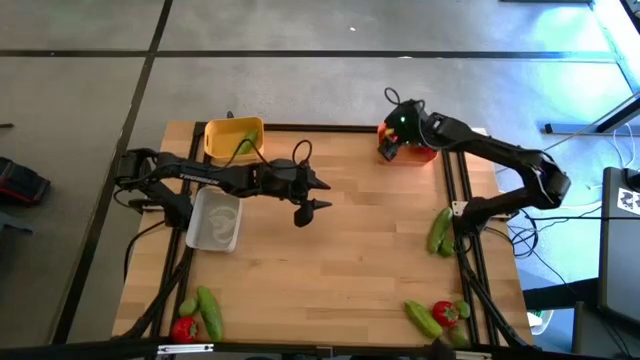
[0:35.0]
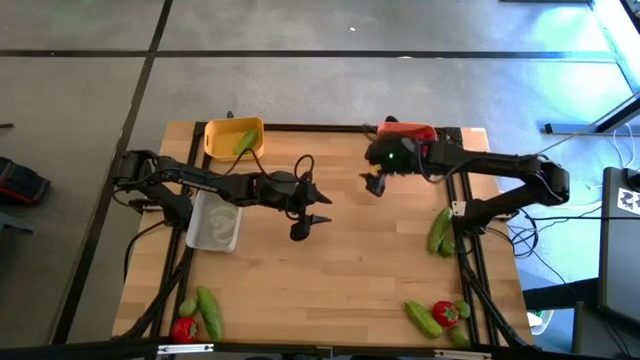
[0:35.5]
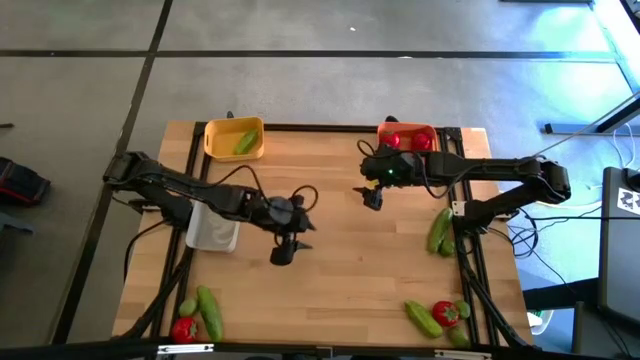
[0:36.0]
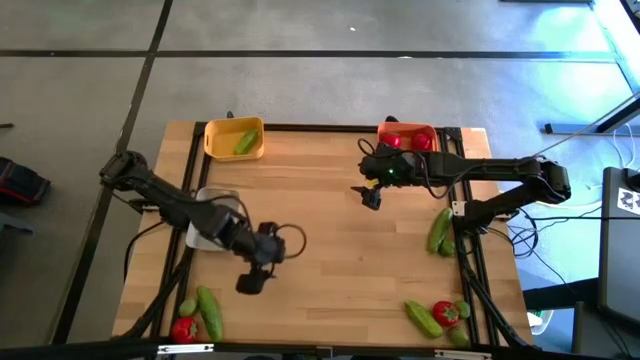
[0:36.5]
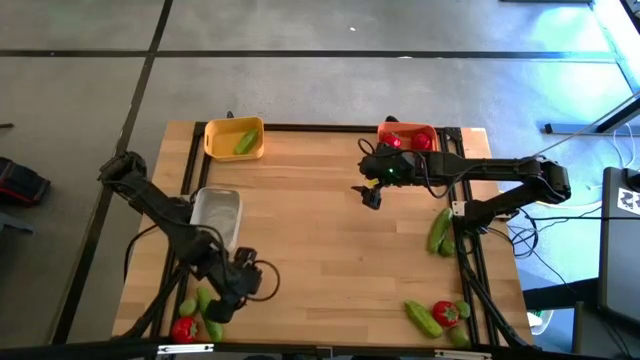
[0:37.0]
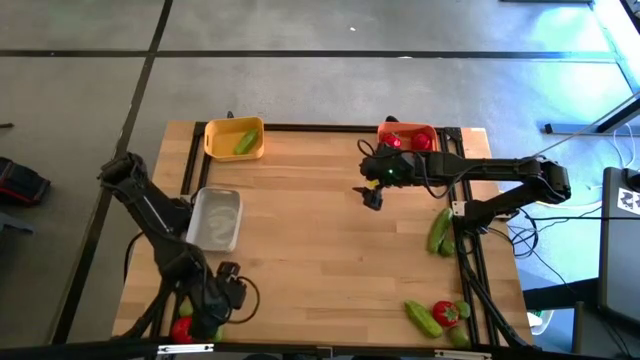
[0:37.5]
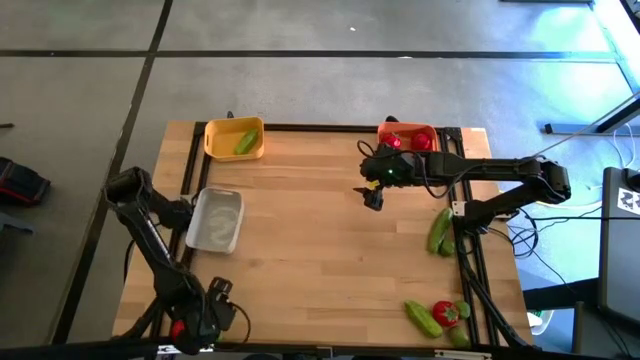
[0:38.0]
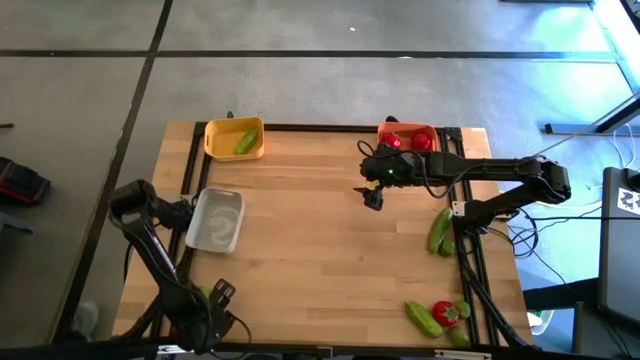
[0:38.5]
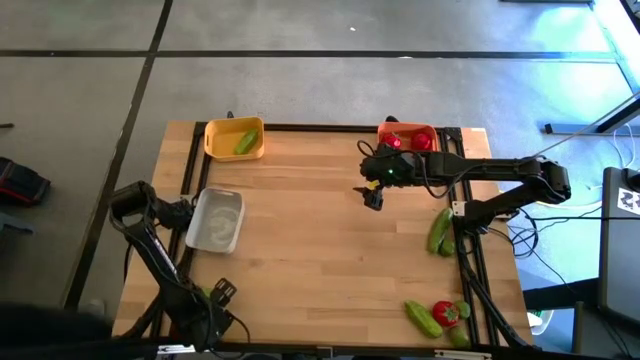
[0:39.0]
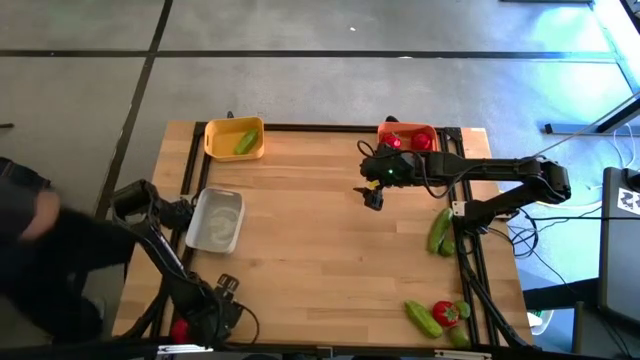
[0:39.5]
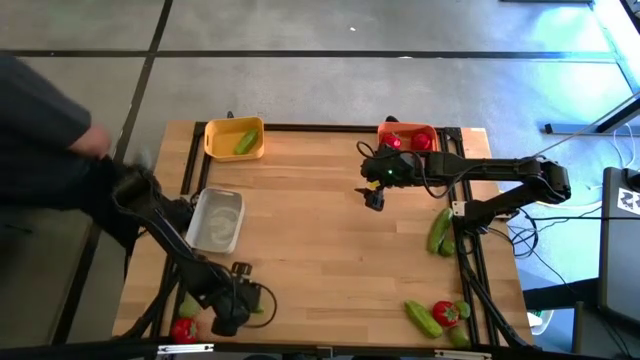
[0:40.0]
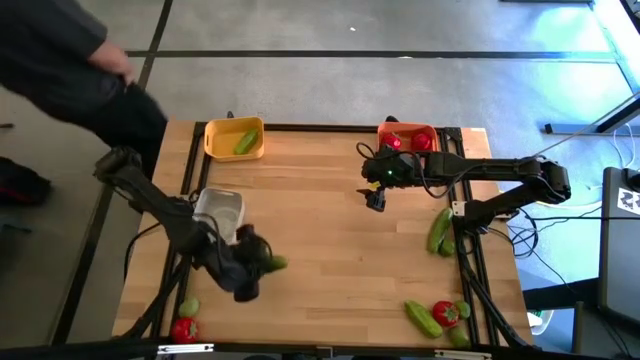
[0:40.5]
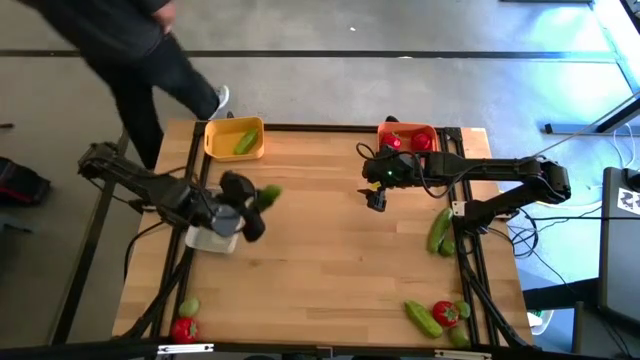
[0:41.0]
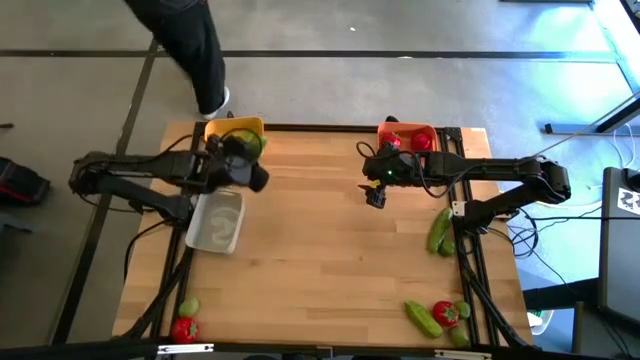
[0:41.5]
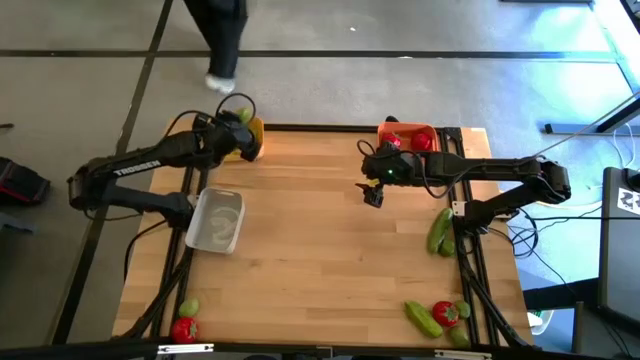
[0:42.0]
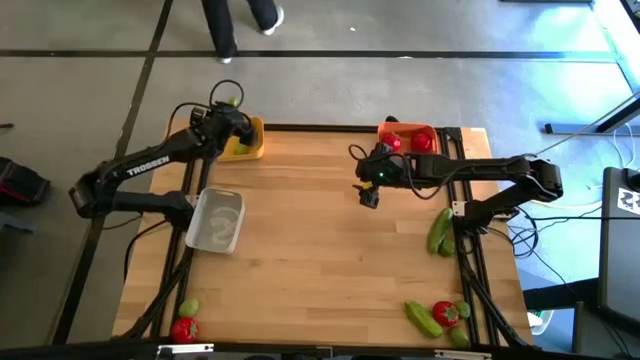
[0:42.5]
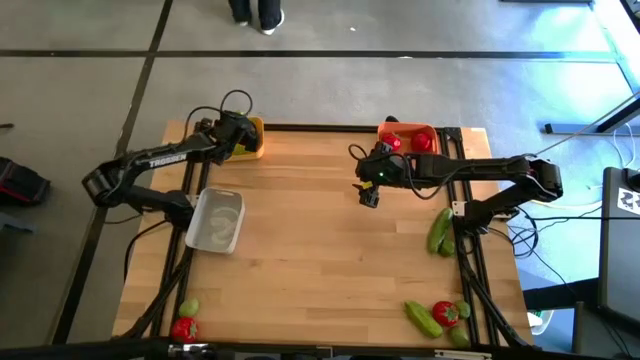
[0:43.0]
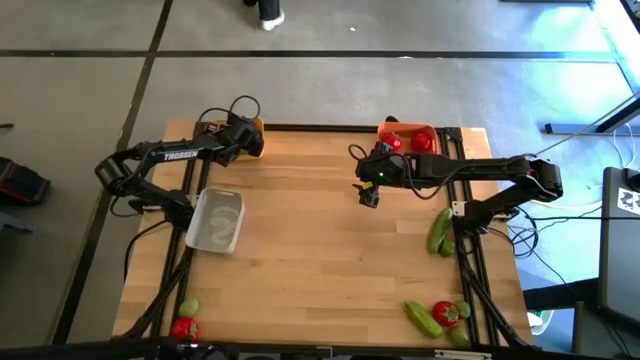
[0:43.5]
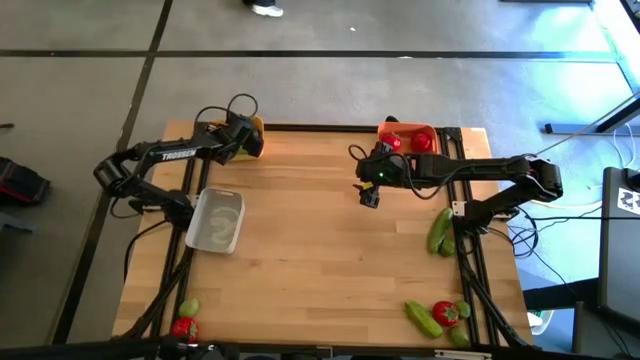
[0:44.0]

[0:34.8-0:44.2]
Task: Sort produce into baskets
Put the bottom left green cucumber into the yellow bin

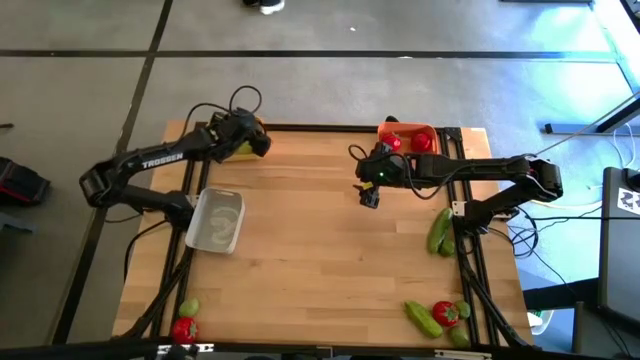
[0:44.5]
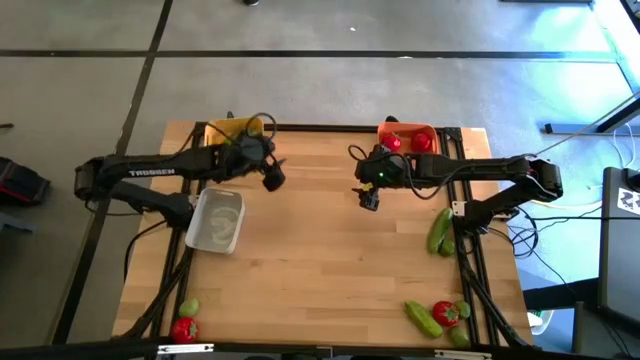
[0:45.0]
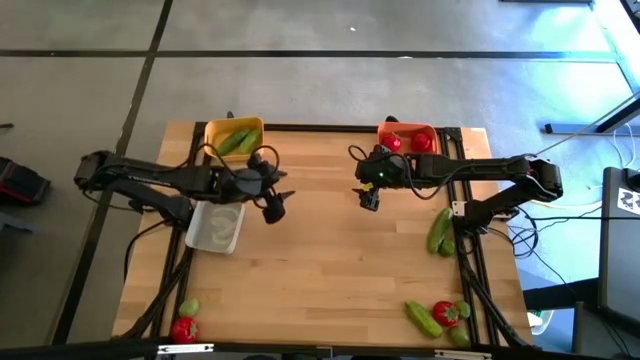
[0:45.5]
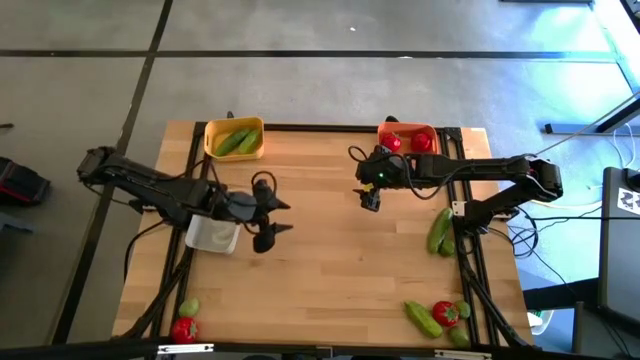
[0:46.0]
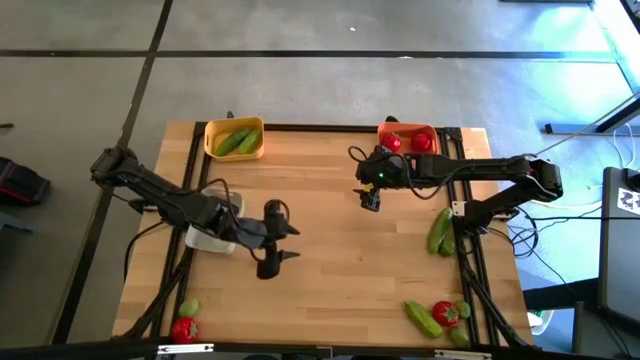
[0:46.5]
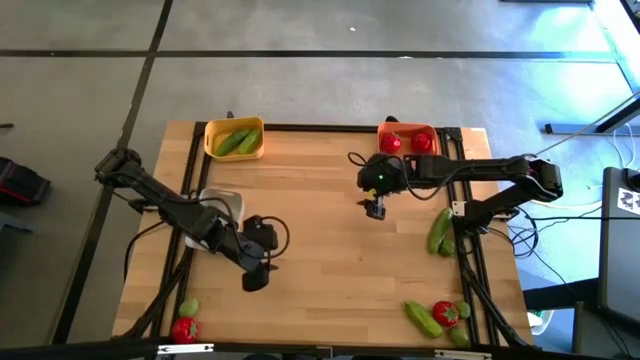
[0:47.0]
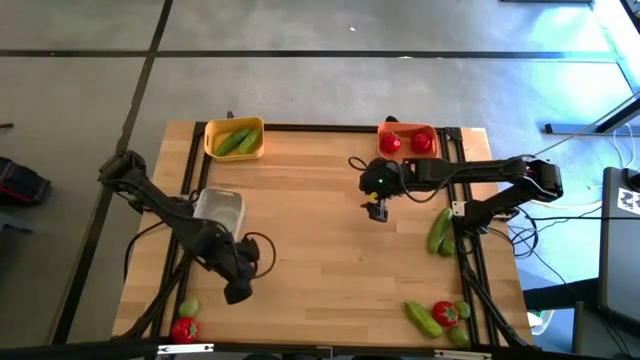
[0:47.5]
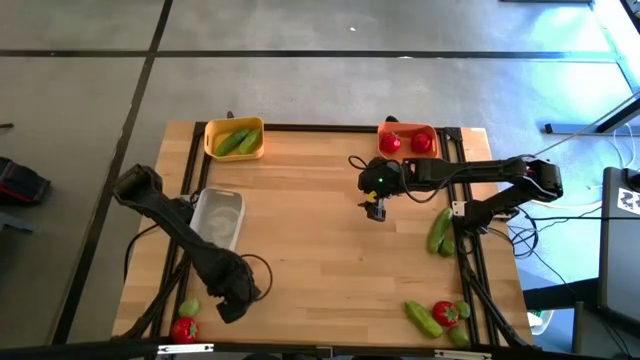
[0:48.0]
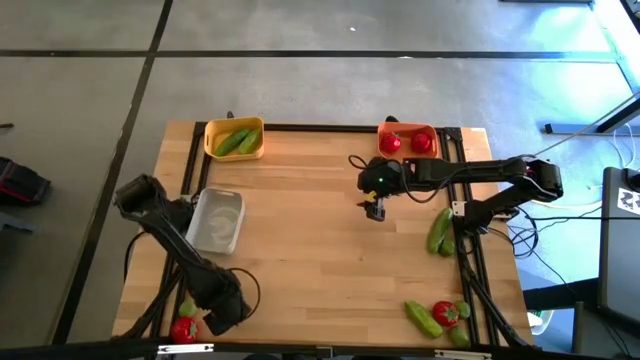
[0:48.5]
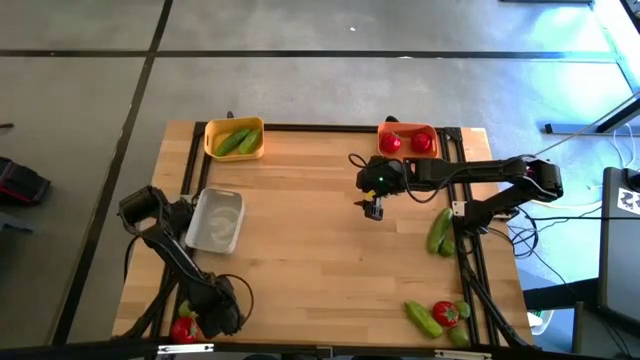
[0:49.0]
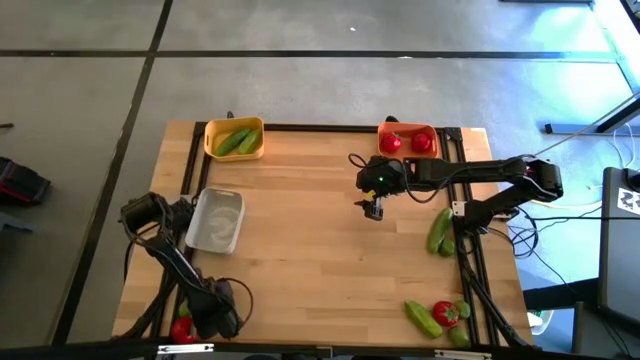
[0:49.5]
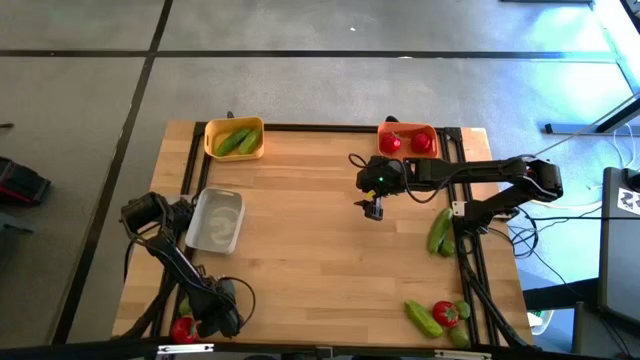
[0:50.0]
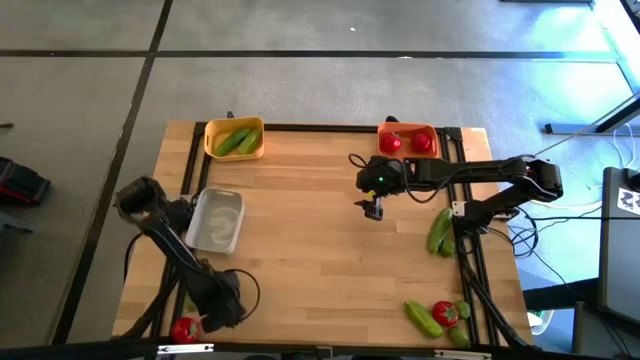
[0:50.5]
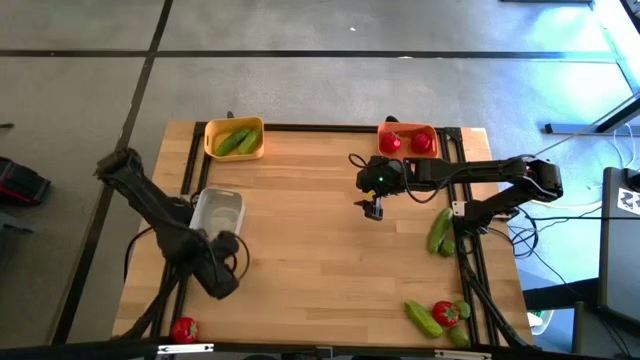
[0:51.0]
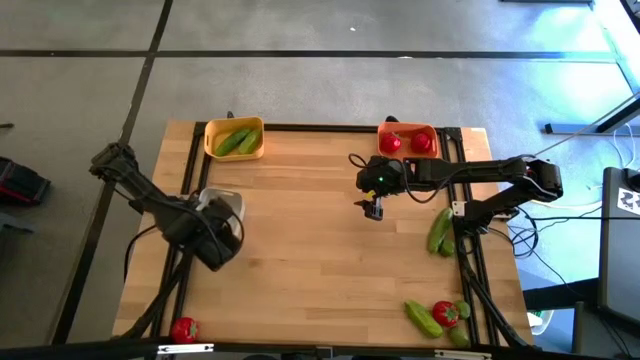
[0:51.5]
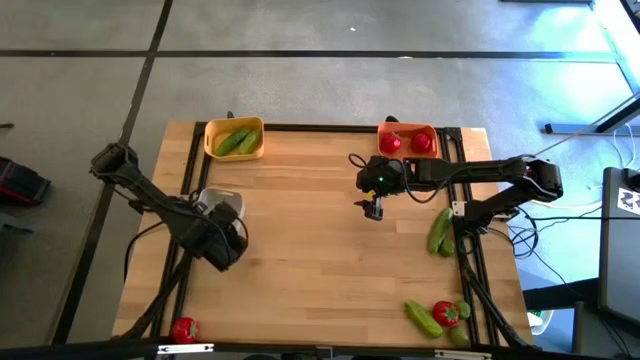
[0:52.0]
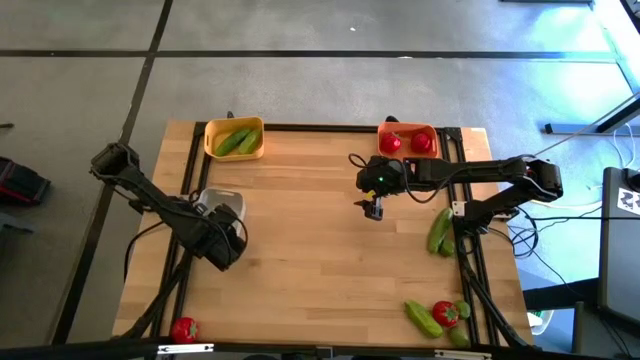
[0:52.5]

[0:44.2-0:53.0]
Put the bottom left green lime into the white bin

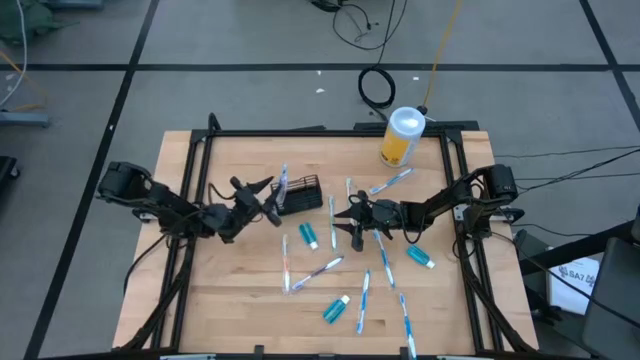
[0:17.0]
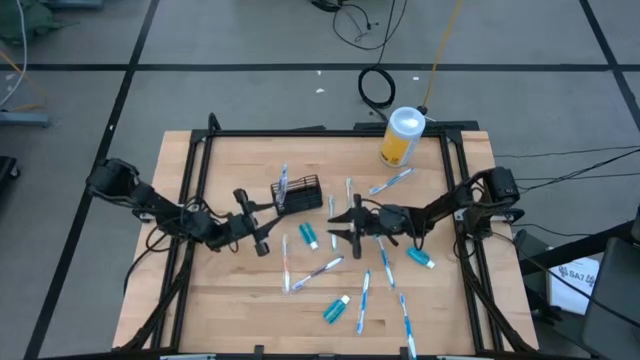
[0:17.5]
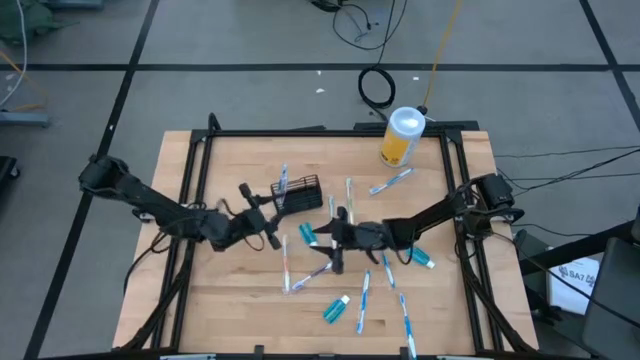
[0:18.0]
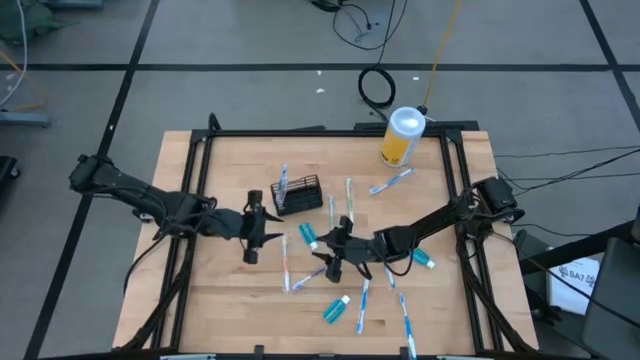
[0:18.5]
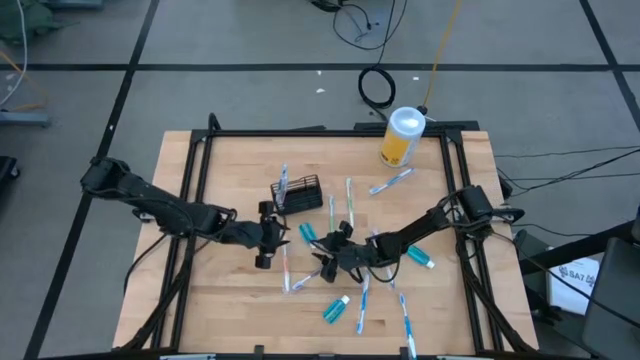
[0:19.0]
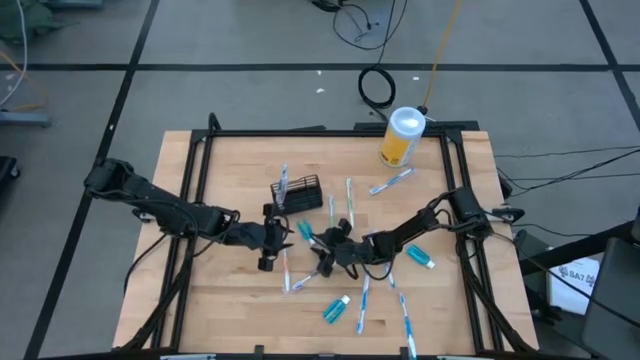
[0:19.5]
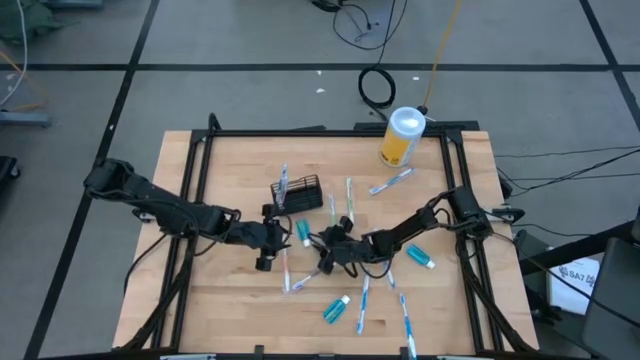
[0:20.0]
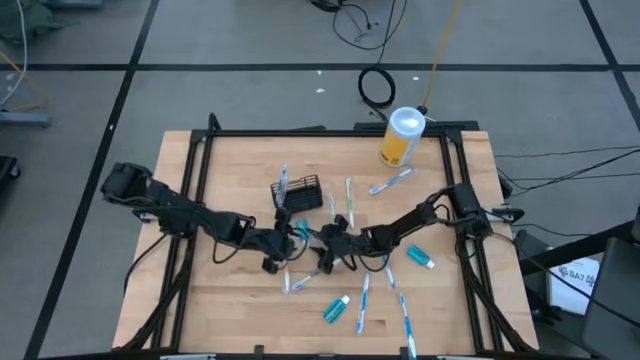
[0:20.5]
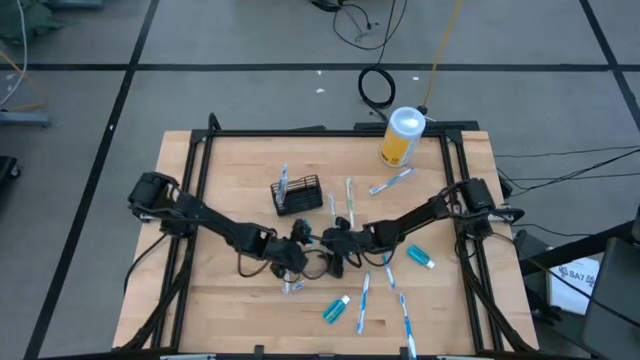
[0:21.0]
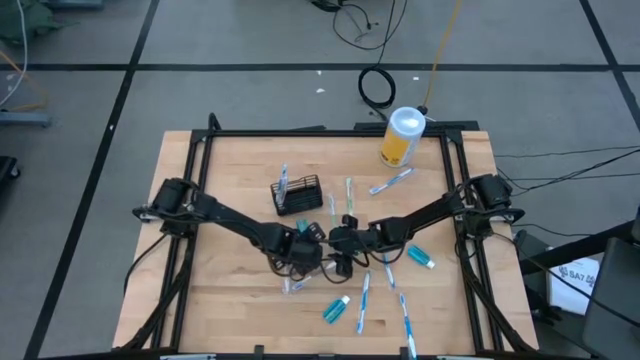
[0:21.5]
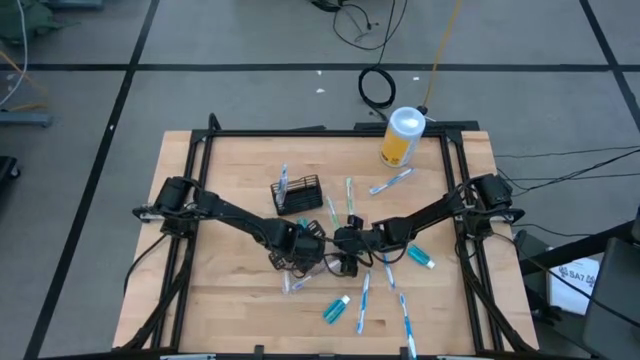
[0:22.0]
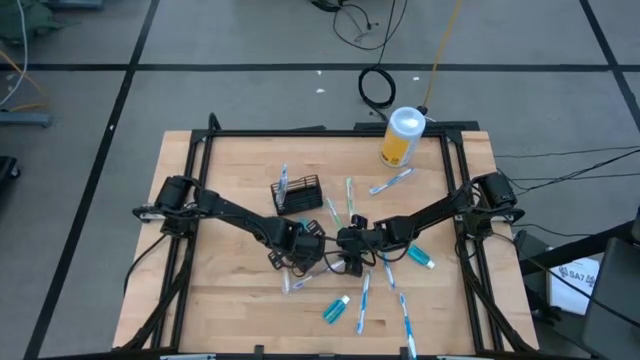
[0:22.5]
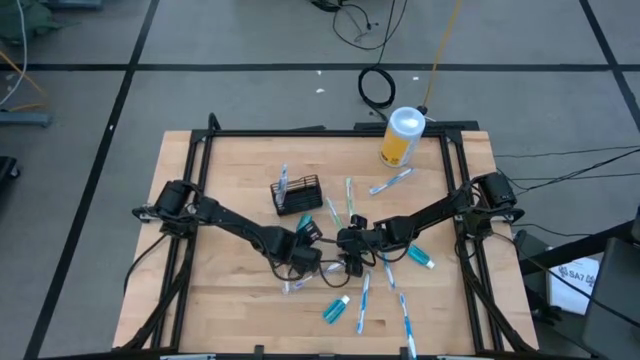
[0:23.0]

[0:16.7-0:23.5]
Task: Pick & Place toothbrushing station
Put the top left blue mouthwash into the black mesh organizer
